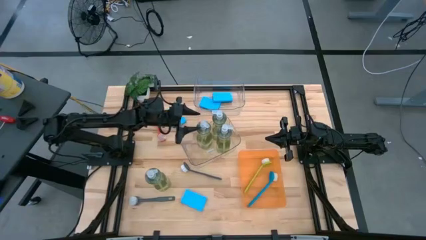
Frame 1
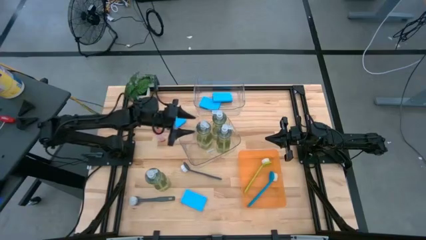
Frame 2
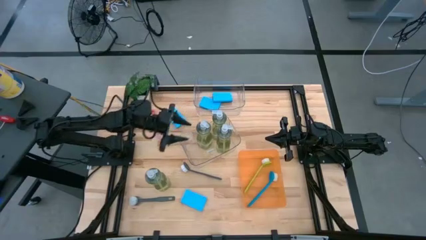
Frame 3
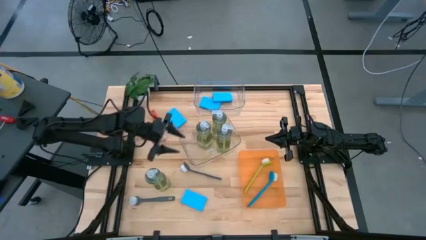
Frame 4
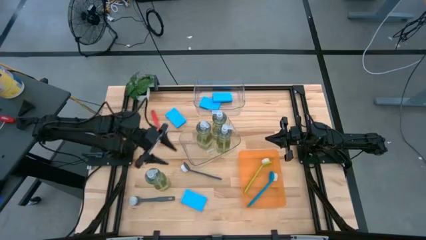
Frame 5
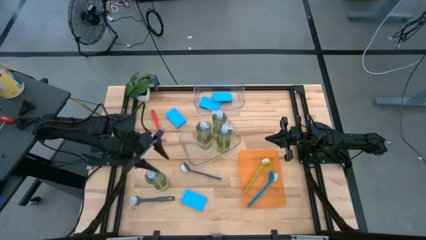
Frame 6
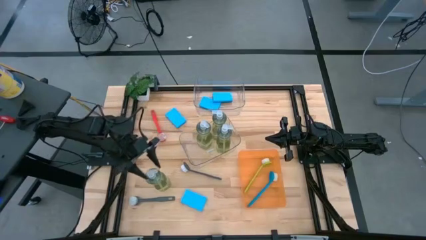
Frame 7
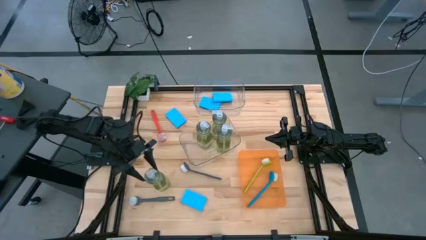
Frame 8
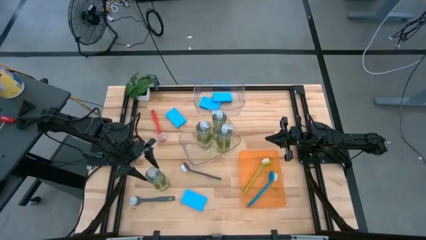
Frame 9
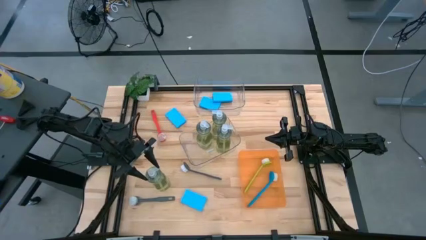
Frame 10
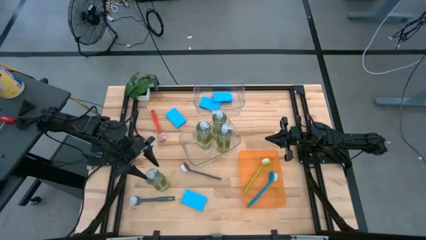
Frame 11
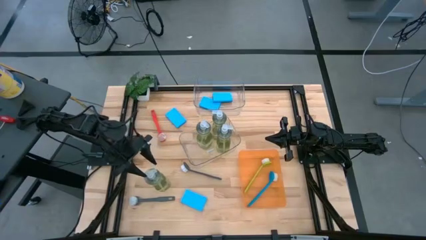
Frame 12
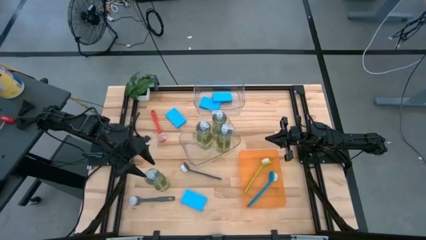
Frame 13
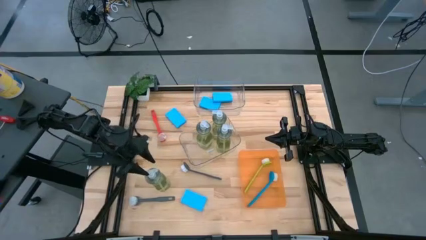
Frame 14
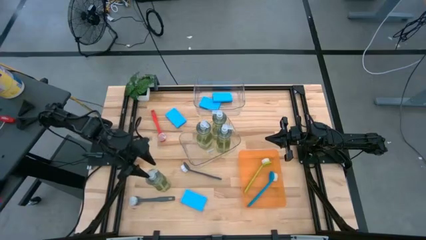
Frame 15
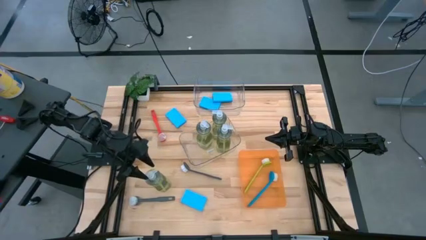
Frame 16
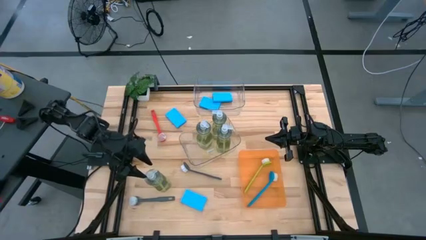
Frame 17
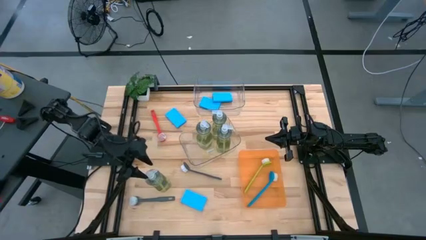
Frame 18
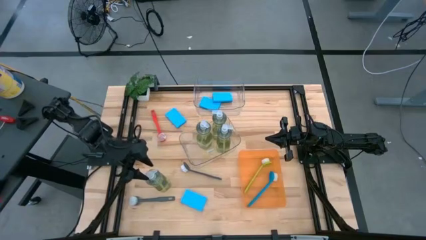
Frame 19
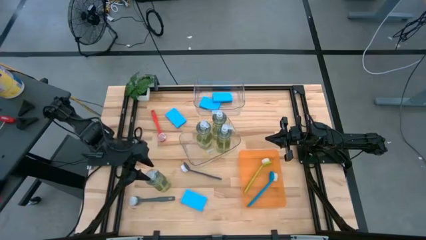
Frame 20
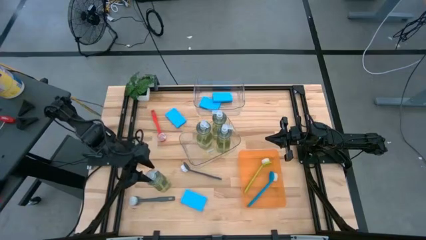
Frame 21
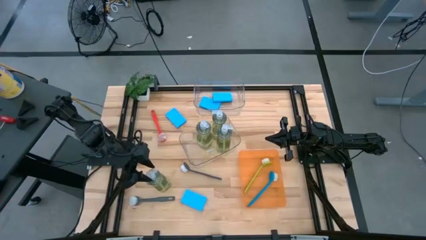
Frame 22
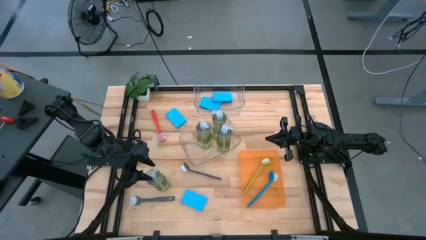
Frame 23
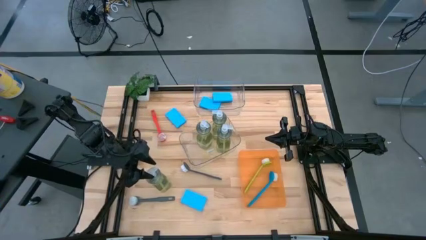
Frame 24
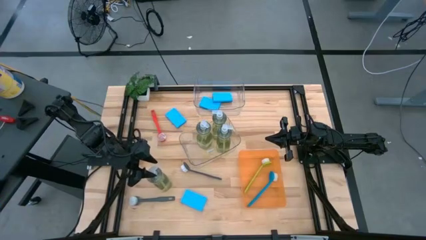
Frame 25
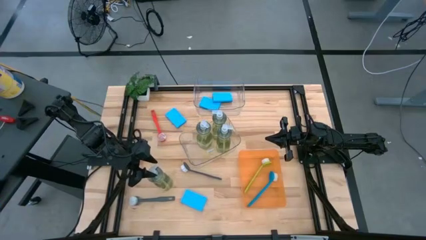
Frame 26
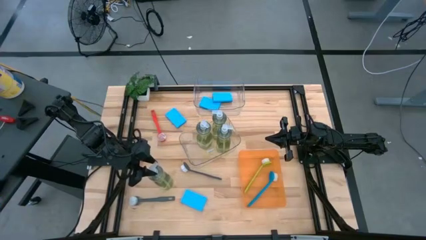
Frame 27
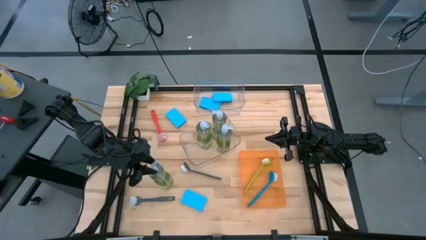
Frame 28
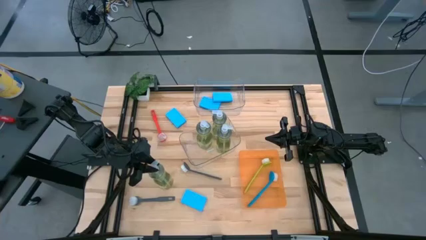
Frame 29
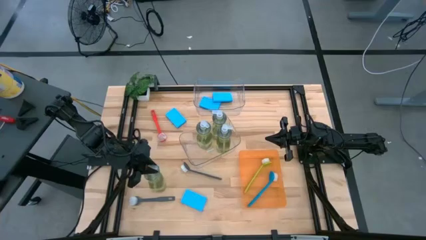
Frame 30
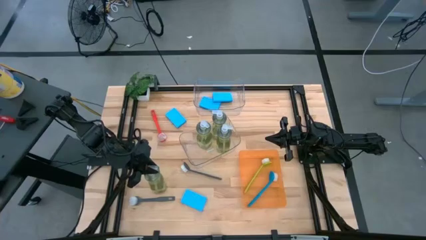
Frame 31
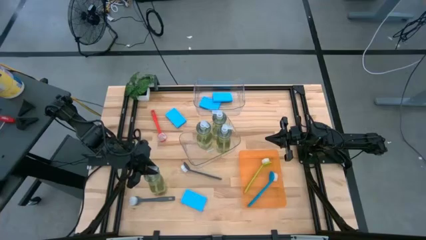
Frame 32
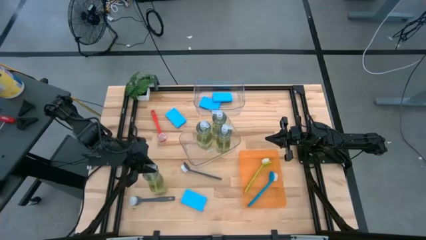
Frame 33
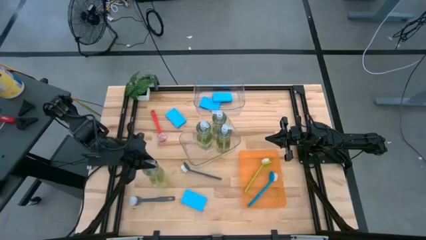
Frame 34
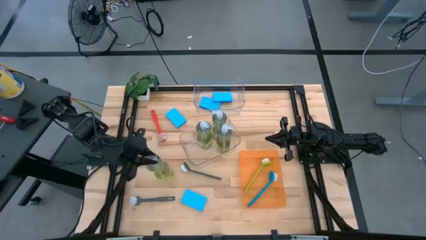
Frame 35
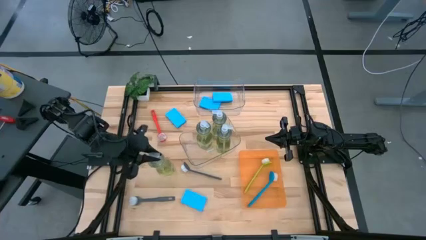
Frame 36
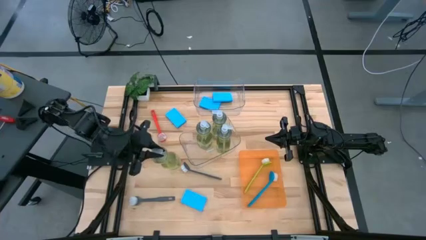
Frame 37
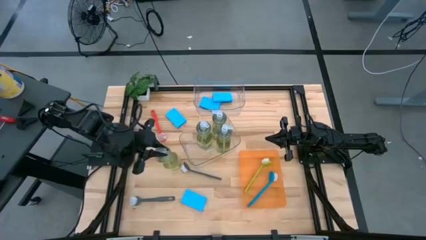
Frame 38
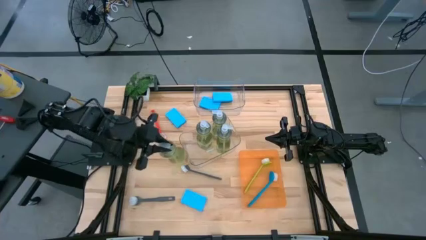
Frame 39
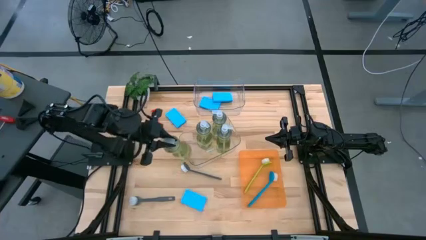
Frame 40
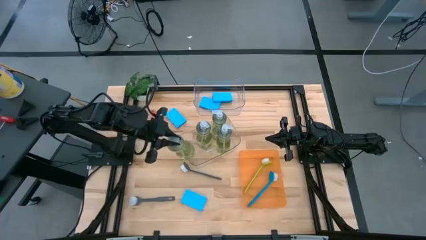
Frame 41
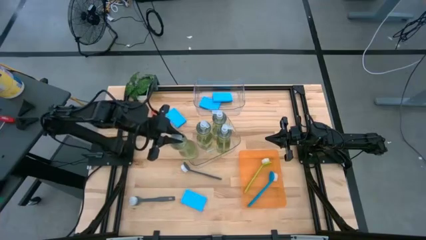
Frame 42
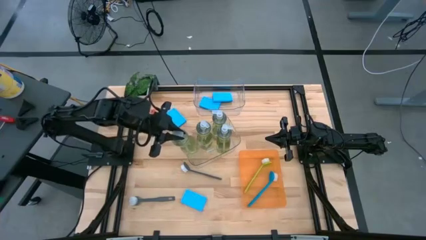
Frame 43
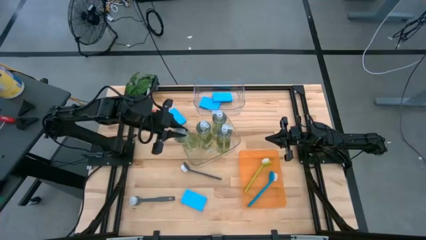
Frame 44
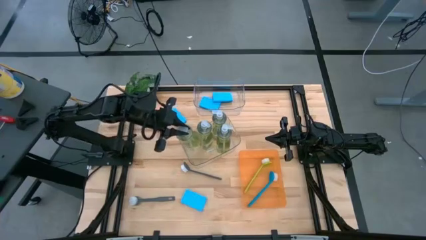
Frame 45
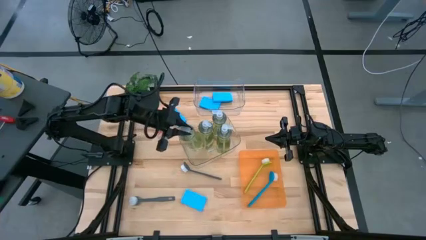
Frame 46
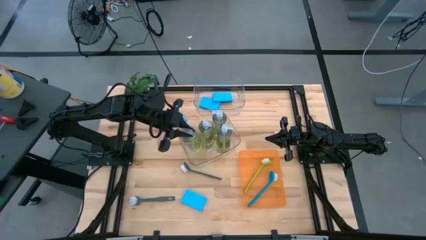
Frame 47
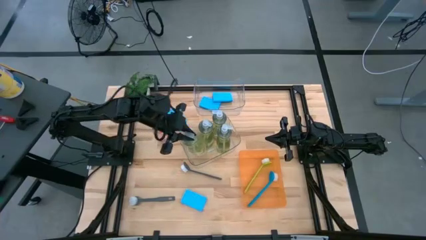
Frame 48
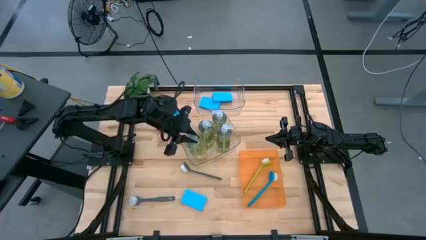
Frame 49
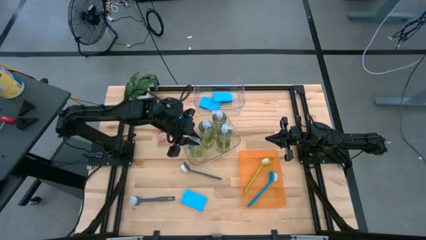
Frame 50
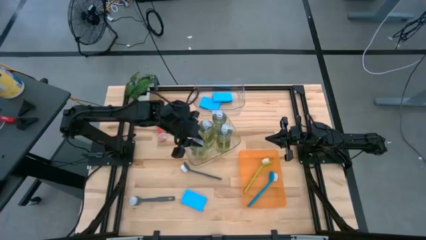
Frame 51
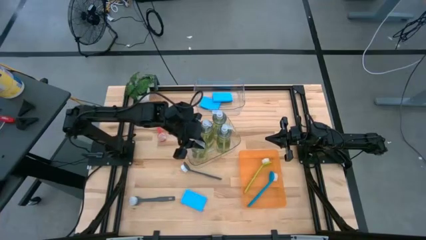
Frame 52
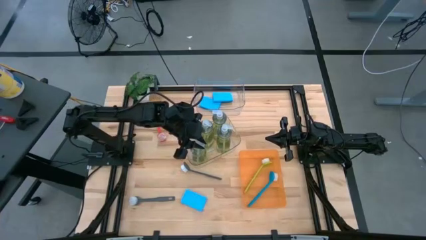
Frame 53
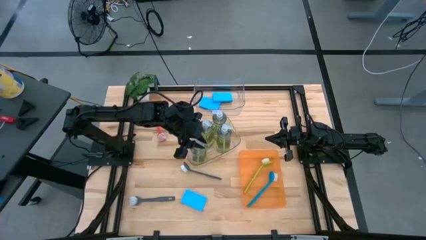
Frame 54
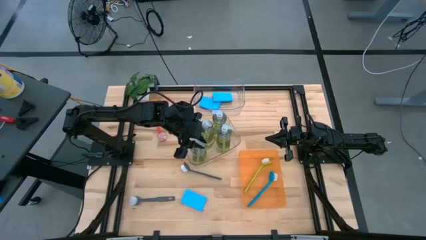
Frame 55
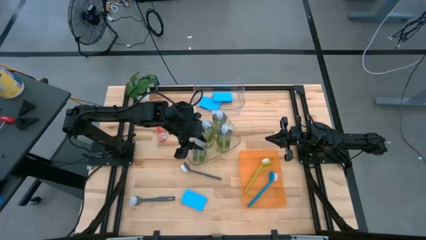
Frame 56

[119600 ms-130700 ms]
Task: Pick & Place Kitchen Sink Supplies
Put the green dish soap into the bottom transparent bin

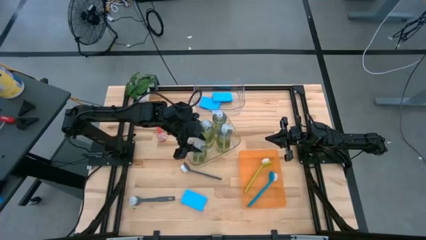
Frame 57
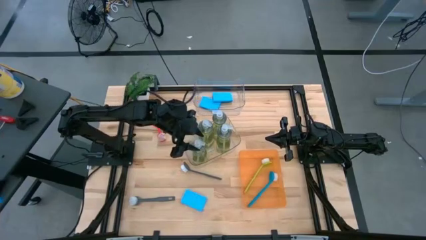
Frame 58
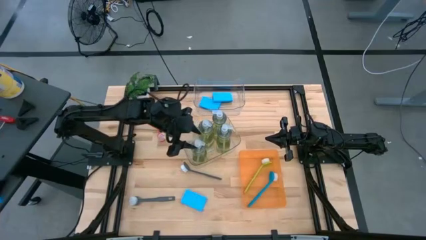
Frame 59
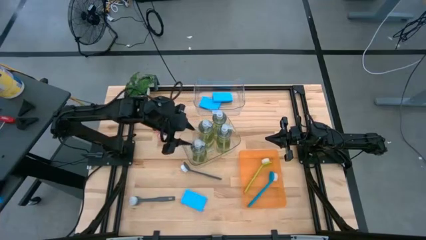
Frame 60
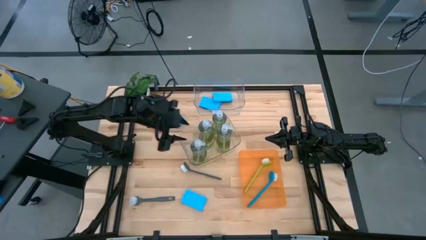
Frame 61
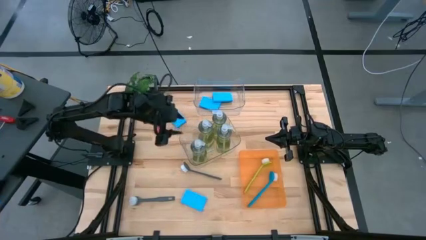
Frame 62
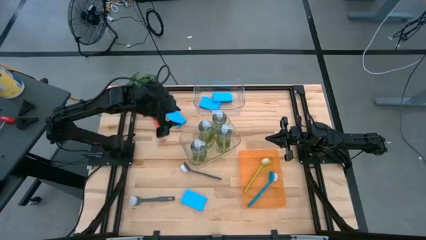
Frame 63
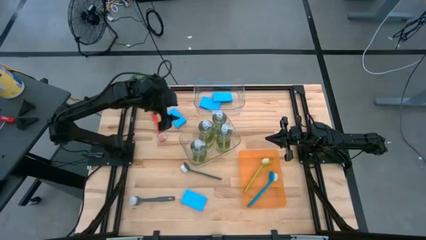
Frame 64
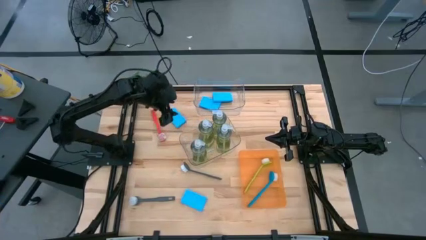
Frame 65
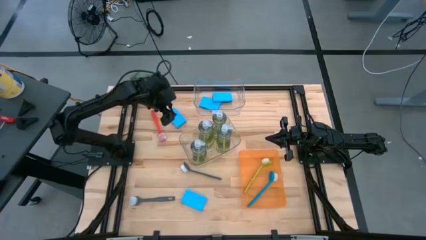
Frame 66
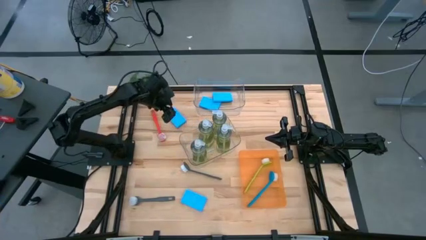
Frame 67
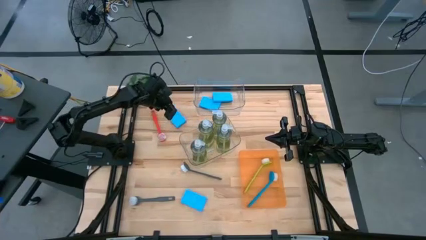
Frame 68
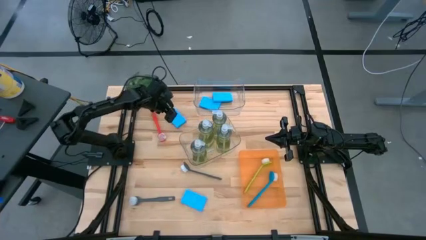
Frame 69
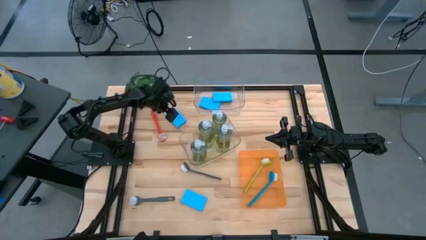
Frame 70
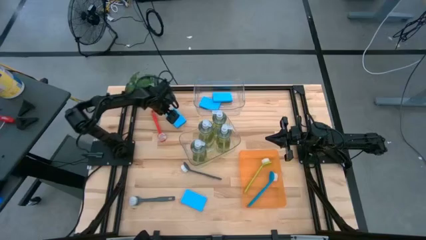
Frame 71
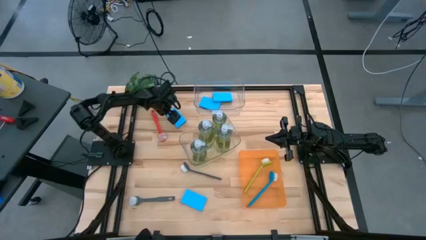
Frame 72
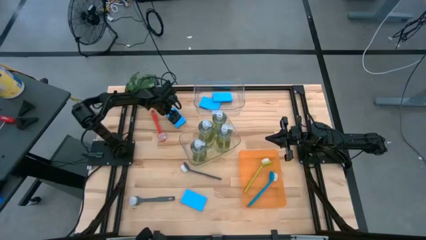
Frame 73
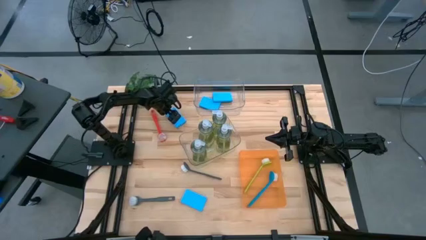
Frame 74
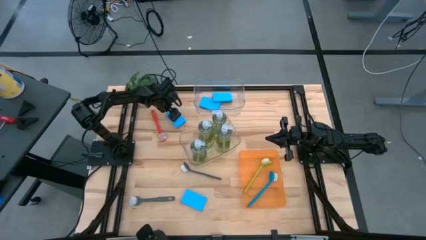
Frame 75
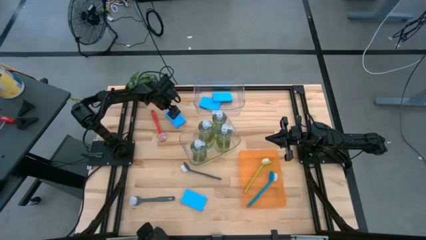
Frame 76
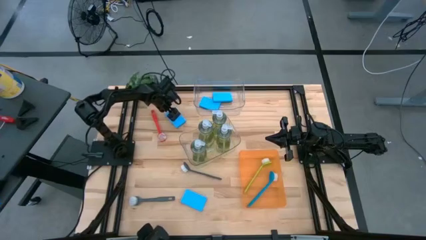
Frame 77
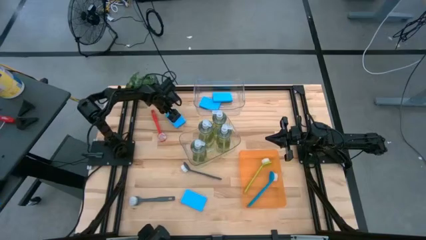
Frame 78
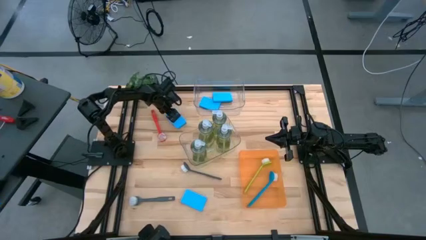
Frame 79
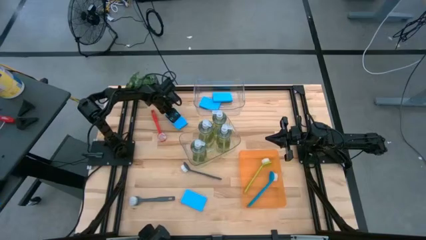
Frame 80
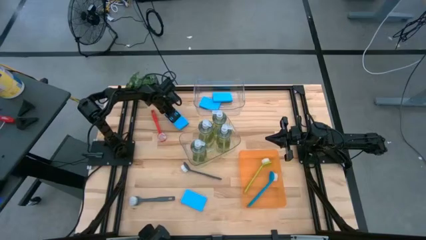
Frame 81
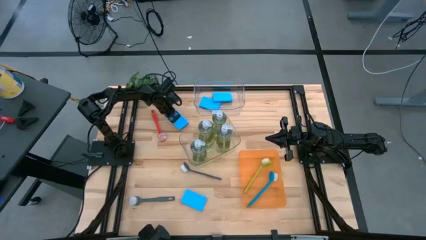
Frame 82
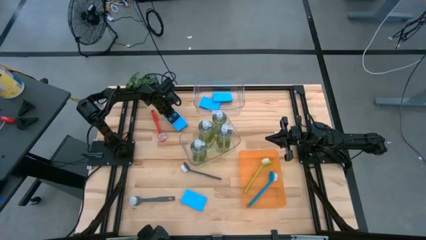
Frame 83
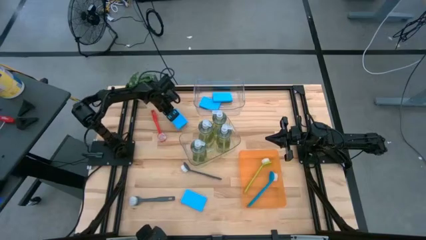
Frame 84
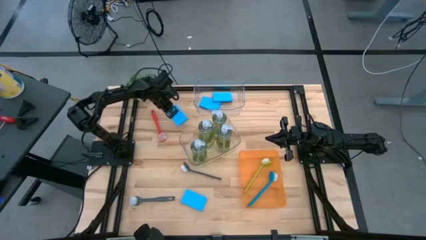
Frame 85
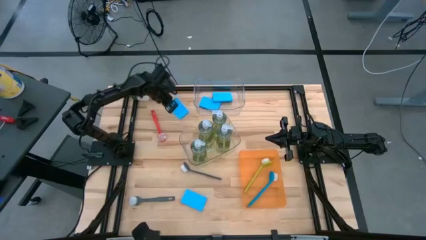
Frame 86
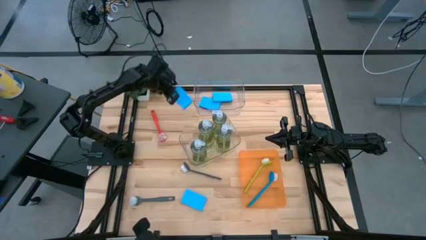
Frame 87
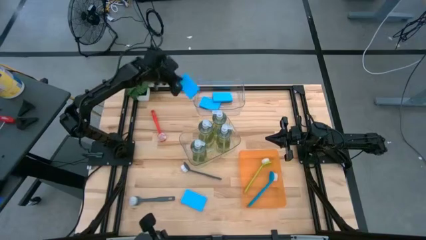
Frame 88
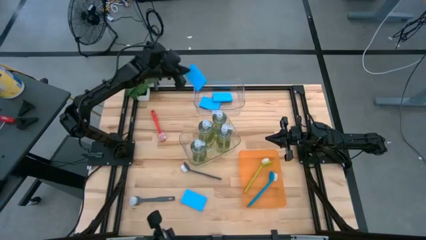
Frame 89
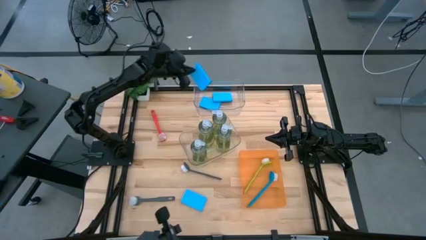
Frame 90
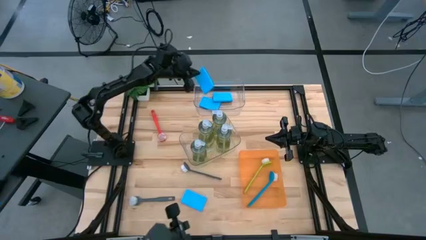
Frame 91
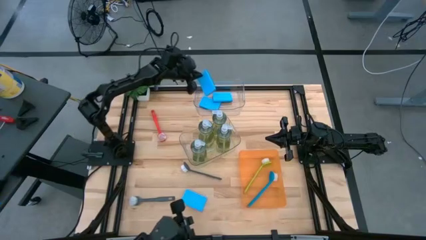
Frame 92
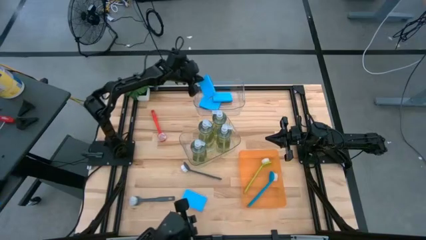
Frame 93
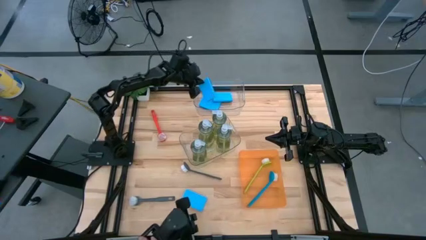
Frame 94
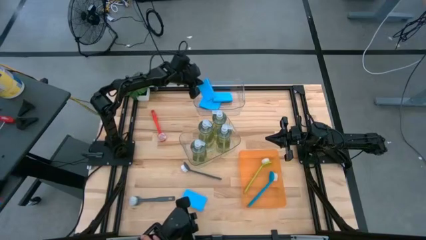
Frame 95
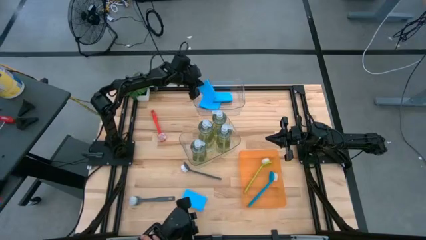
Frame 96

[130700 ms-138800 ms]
Put the blue sponge into the top transparent bin
